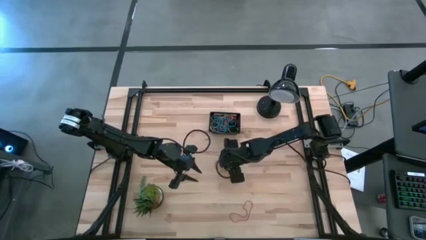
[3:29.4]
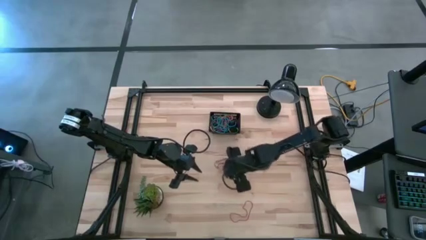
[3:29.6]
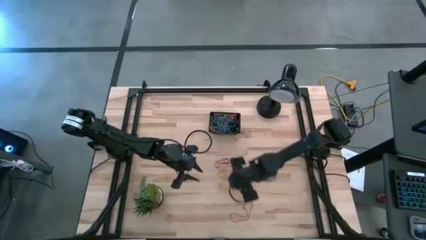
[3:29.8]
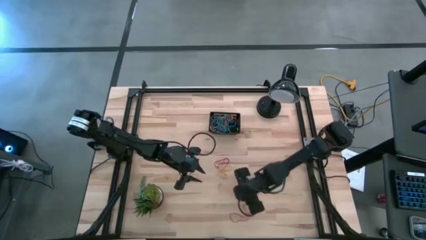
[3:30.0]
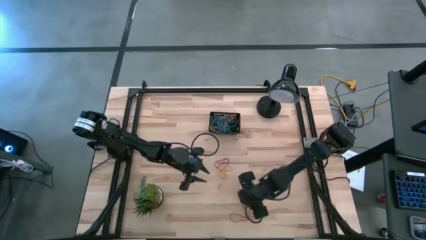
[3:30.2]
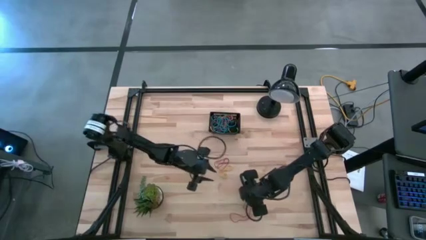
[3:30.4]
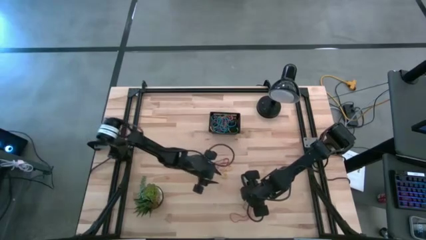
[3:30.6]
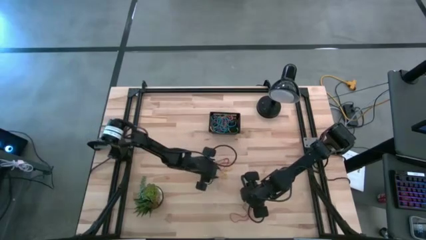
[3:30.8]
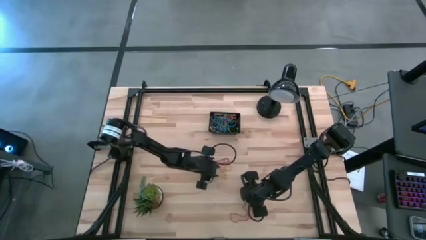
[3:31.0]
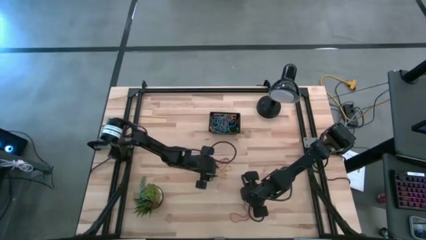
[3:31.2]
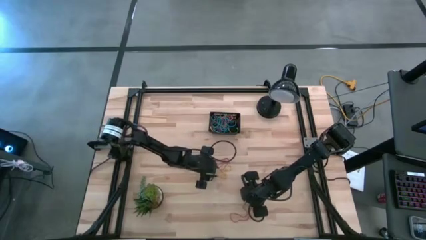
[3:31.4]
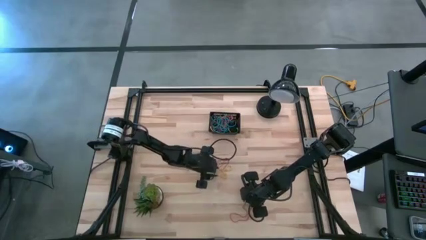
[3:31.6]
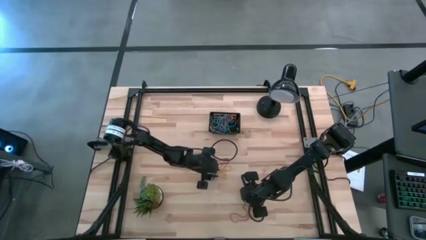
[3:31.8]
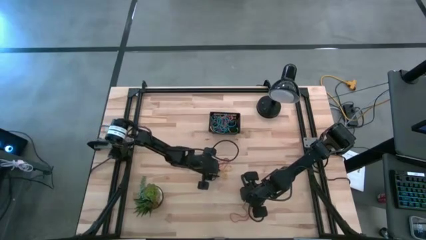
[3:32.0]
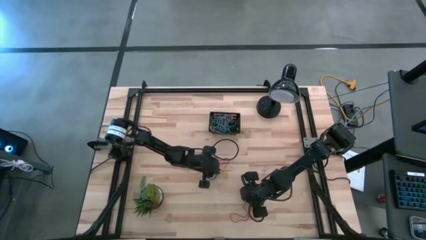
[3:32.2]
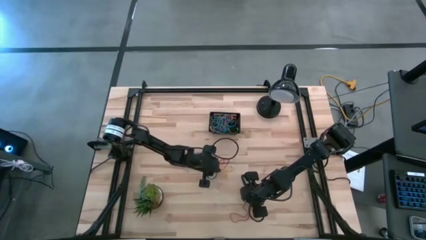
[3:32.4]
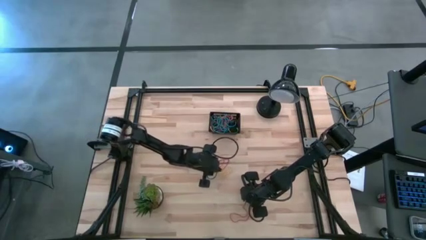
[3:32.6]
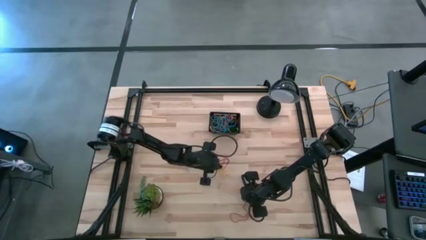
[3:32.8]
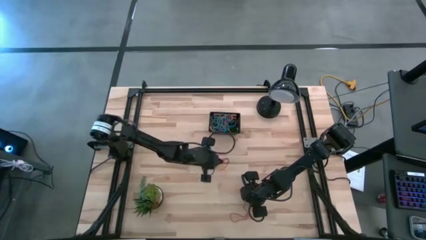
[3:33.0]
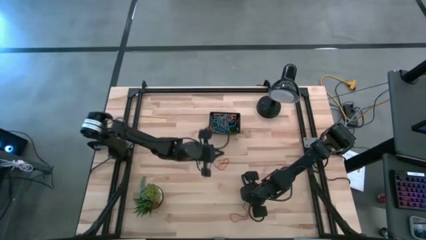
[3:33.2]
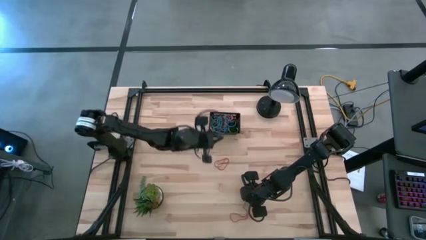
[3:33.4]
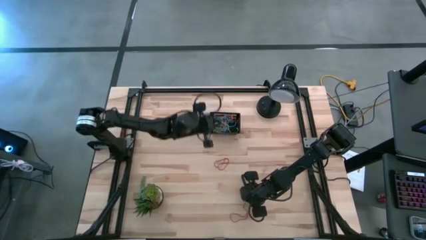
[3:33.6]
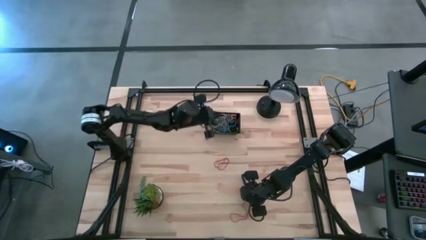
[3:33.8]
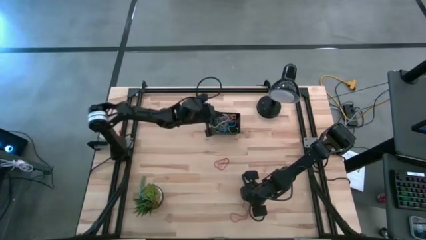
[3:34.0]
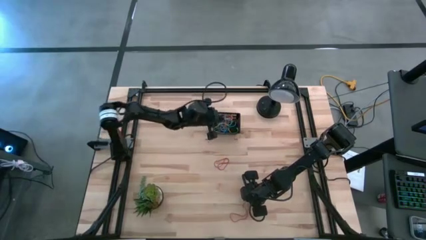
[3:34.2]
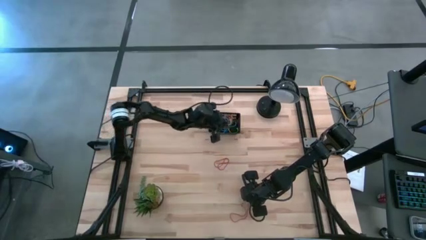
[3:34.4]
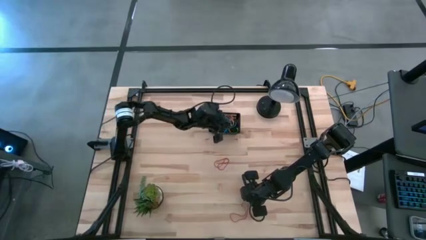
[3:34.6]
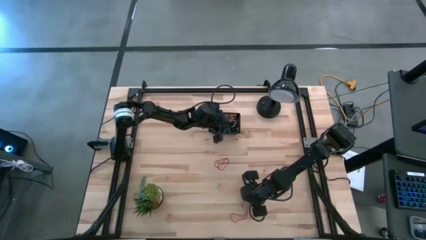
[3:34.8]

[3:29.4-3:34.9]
Task: Pick and place rubber bands into bin
Put the yellow rubber band into the basket

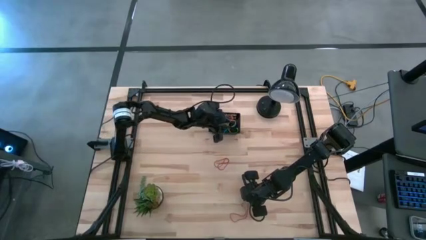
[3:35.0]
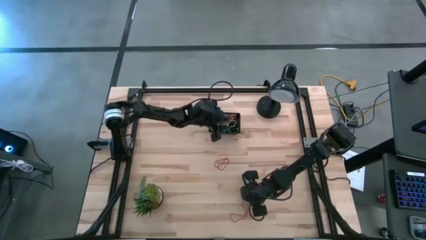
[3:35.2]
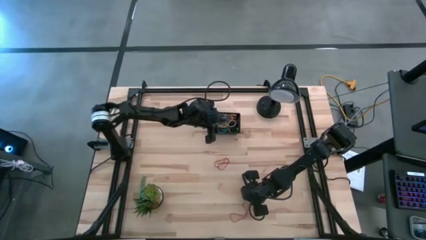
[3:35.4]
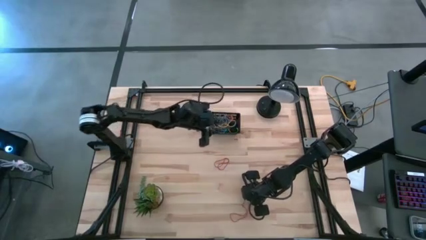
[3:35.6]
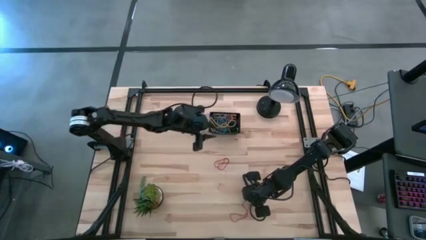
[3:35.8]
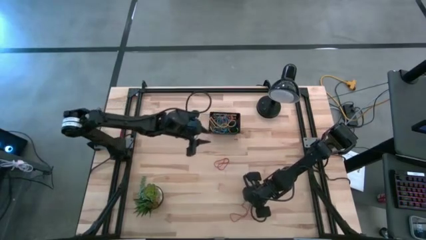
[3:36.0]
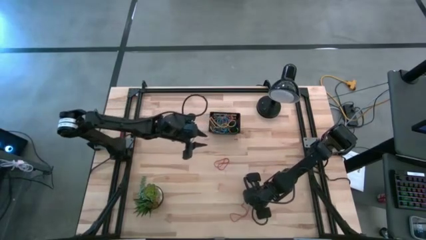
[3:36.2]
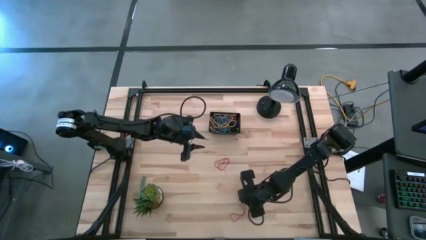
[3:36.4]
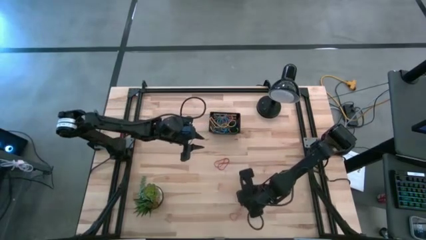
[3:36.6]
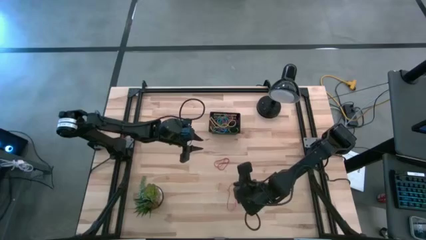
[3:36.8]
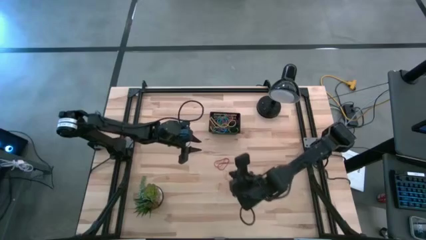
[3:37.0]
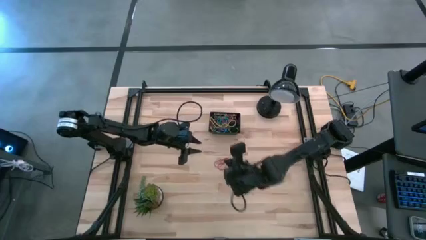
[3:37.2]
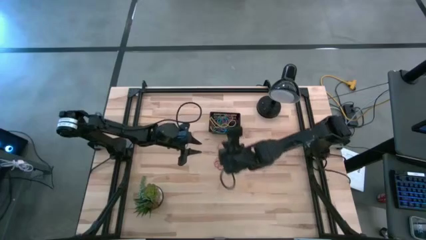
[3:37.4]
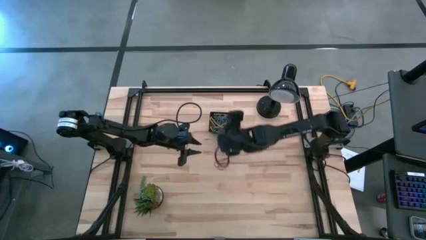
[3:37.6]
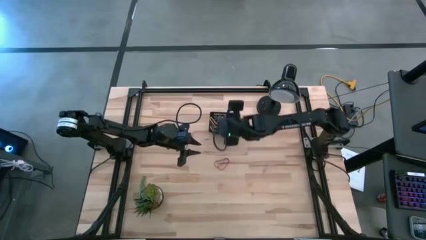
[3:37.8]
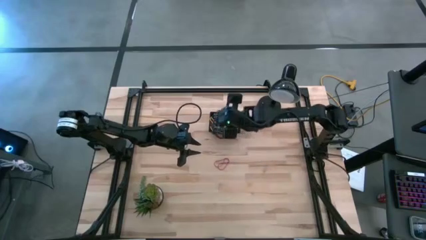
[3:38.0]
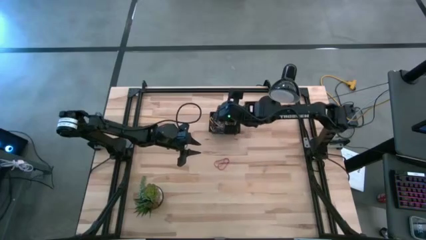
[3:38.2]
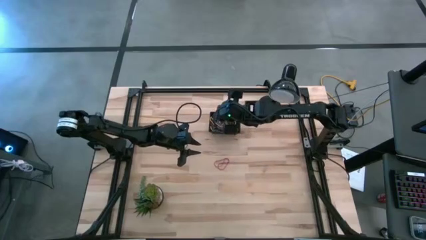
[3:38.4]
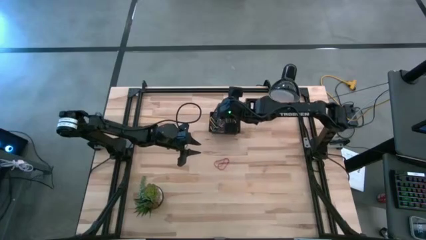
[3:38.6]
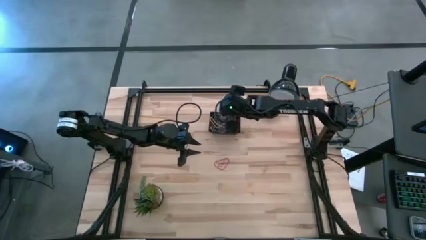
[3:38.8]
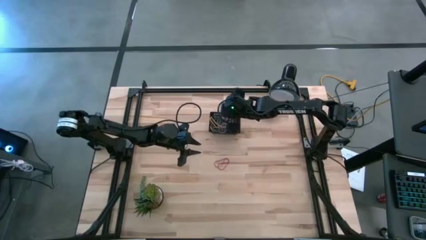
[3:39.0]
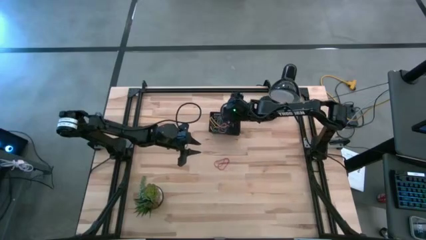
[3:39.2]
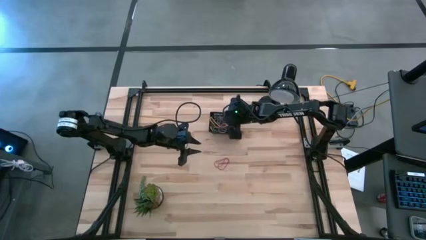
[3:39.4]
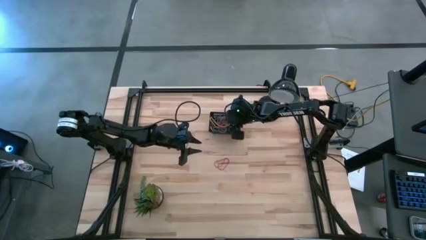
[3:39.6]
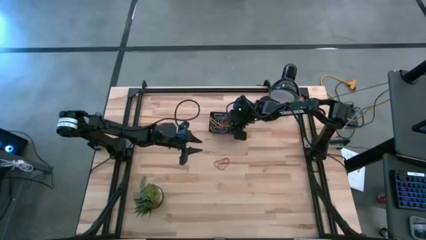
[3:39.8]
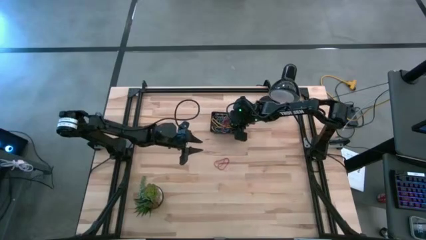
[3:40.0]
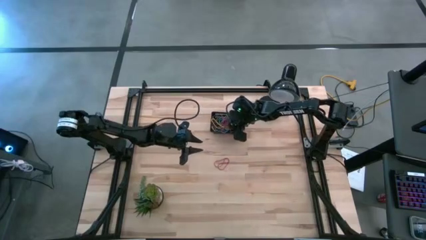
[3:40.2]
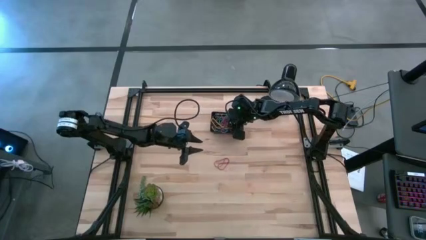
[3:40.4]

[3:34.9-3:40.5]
Put the red rubber band into the basket

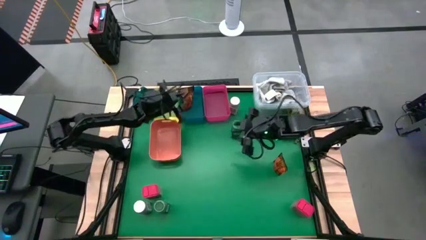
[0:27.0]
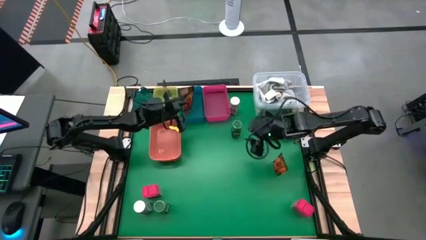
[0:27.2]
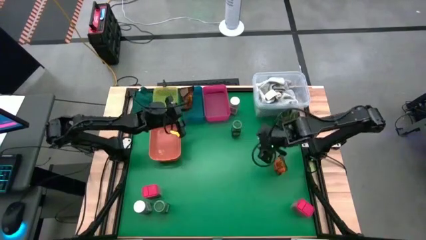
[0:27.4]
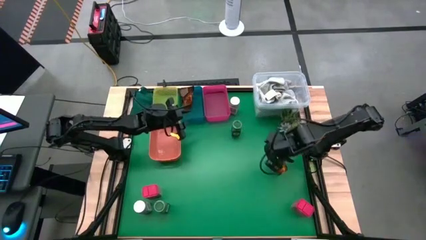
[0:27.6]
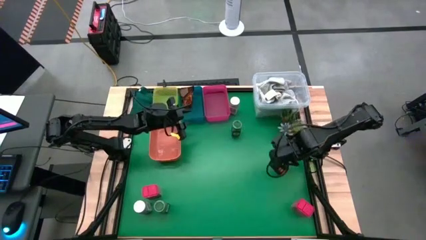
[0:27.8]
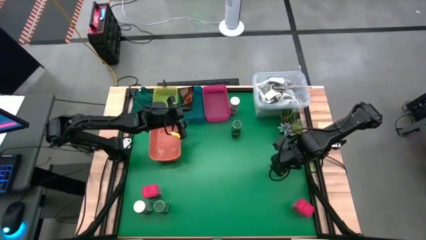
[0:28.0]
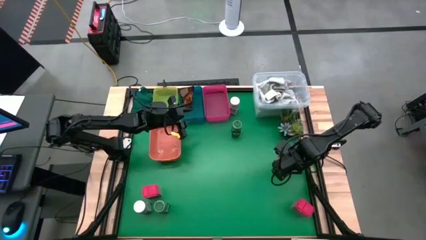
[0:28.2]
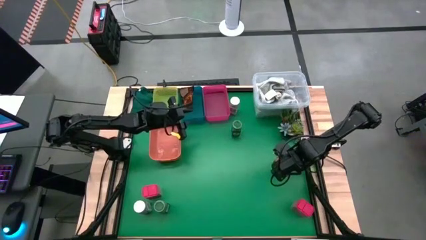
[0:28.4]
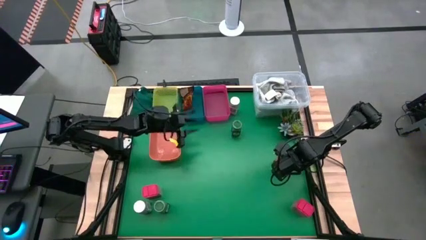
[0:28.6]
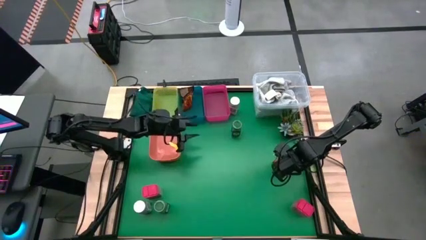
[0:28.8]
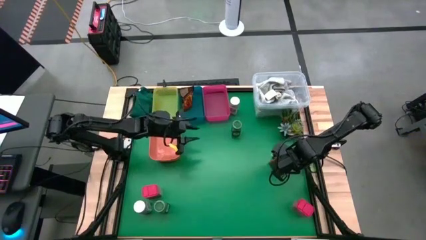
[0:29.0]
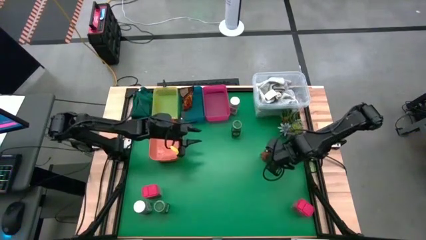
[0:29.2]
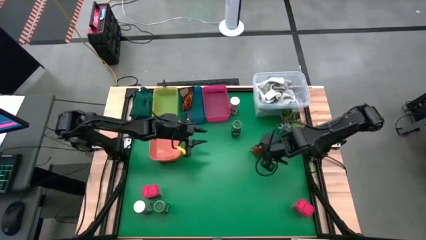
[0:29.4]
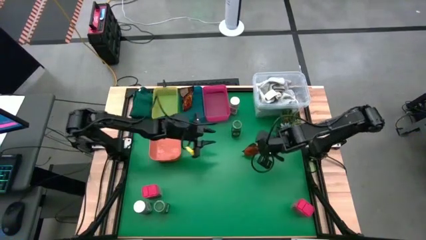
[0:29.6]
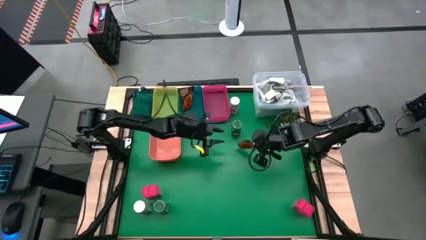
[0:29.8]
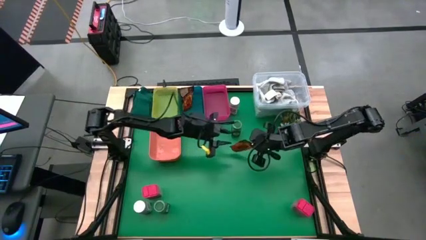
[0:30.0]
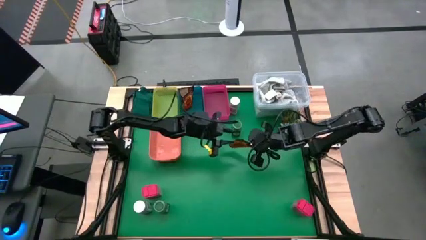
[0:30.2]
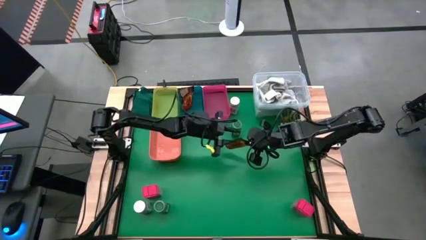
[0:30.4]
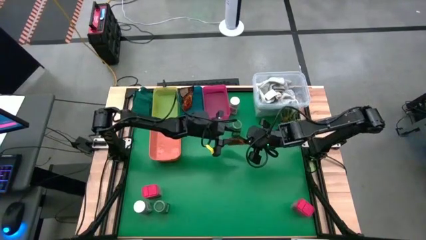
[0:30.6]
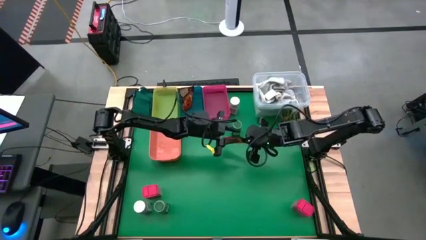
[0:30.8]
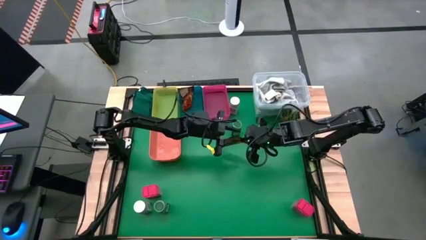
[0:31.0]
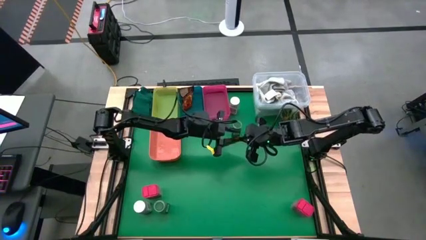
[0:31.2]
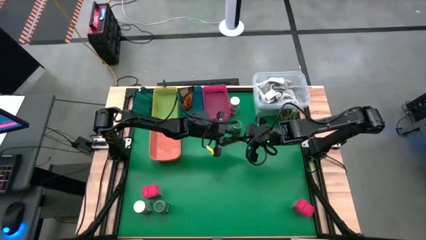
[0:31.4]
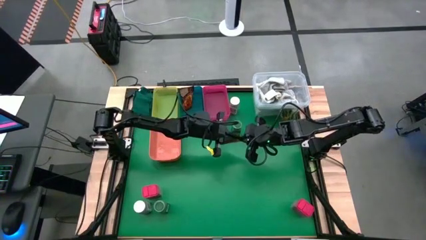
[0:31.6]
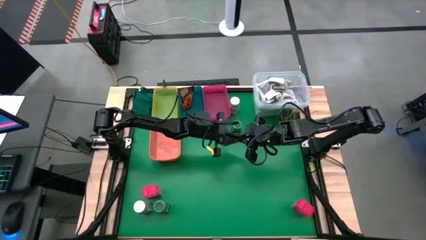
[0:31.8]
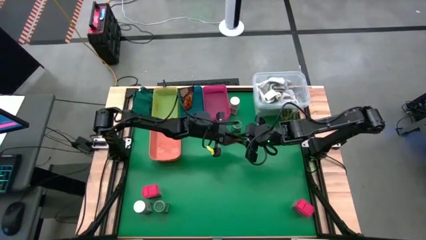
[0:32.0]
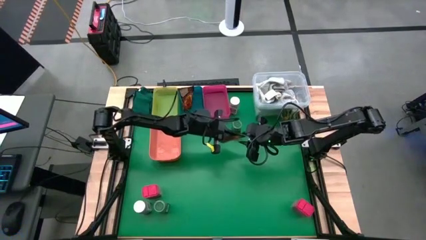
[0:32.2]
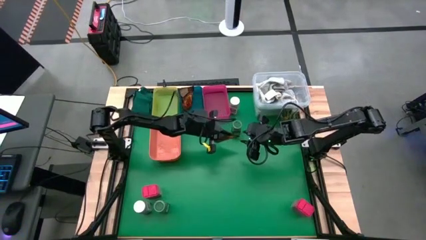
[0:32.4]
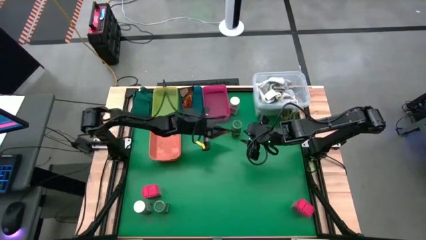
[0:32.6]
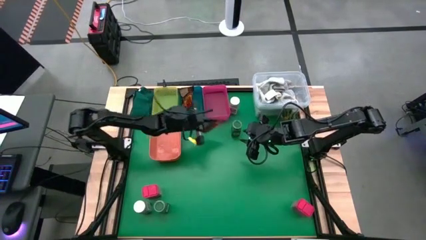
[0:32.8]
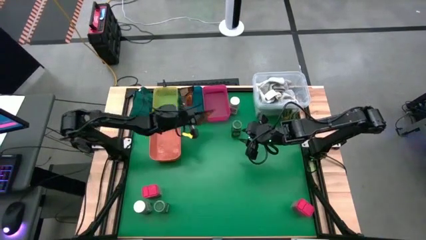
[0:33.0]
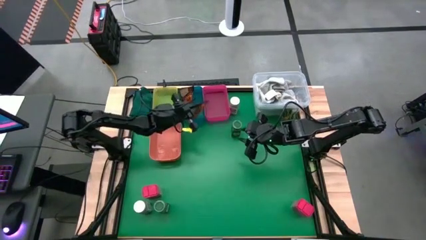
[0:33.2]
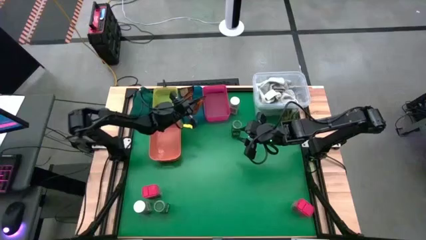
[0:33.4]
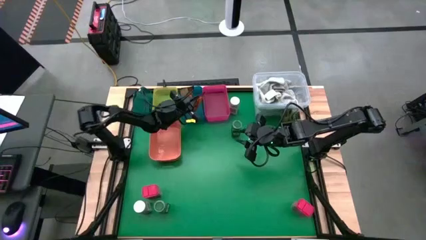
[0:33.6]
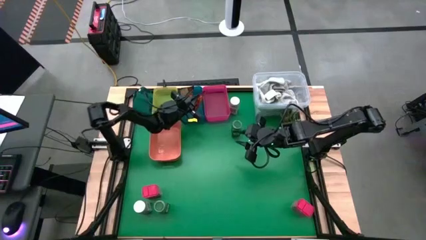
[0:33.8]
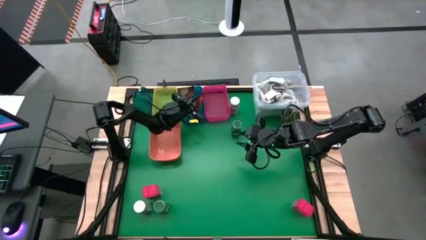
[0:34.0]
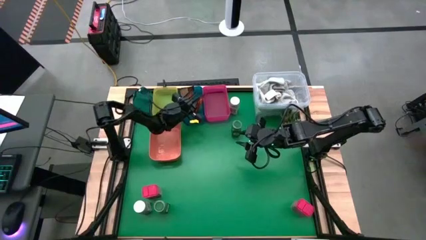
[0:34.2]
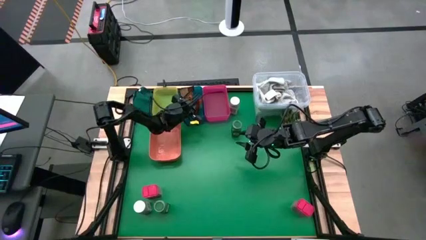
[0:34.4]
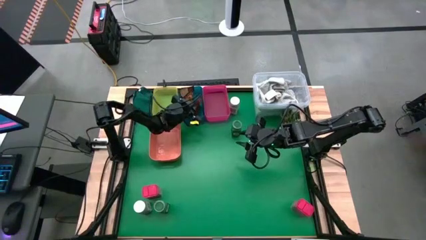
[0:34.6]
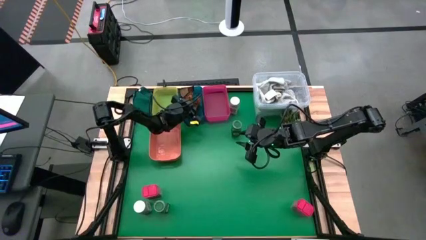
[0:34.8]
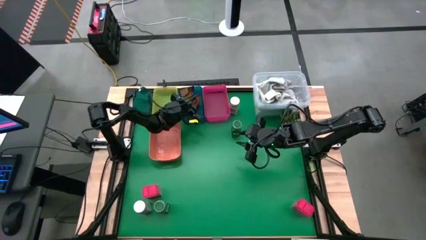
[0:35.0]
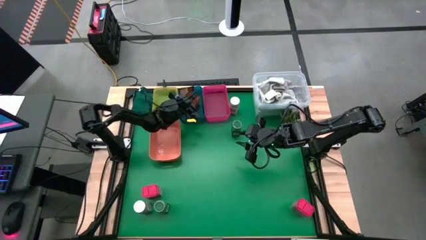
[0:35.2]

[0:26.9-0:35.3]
Task: Sort spices by type
Put the orange spice bag into the blue bin
